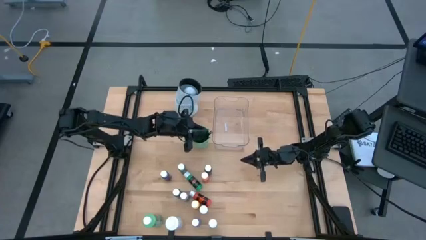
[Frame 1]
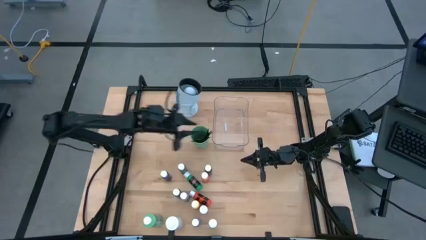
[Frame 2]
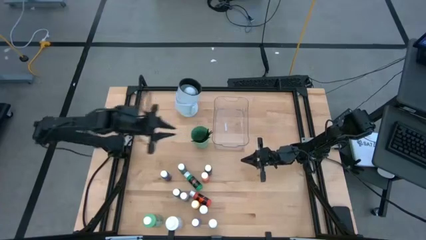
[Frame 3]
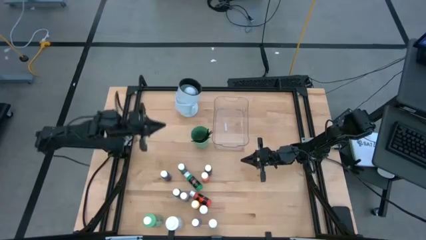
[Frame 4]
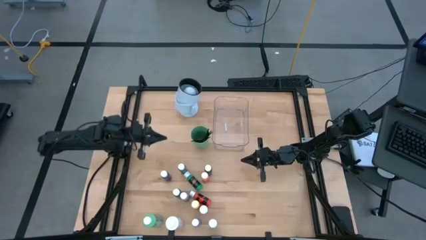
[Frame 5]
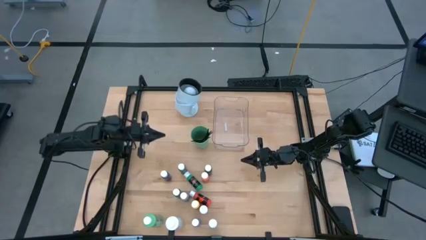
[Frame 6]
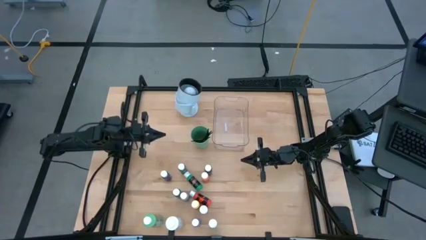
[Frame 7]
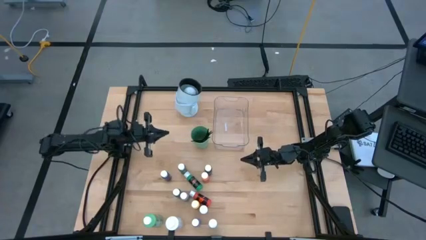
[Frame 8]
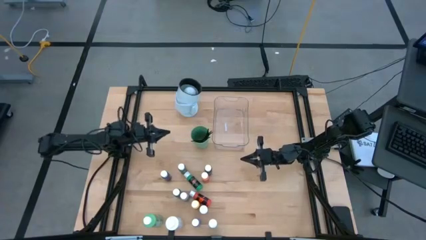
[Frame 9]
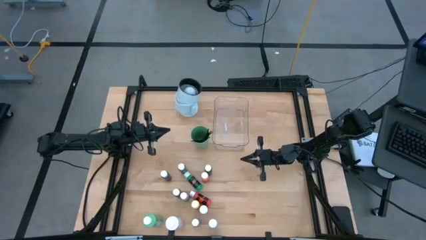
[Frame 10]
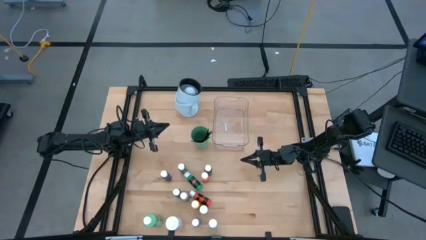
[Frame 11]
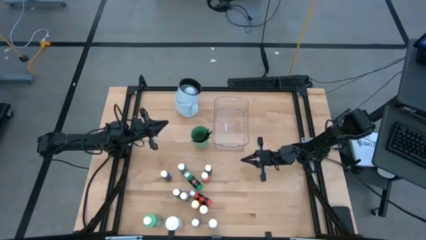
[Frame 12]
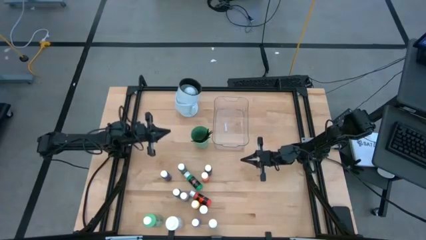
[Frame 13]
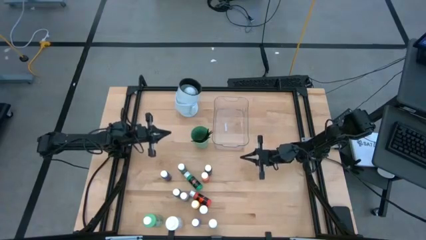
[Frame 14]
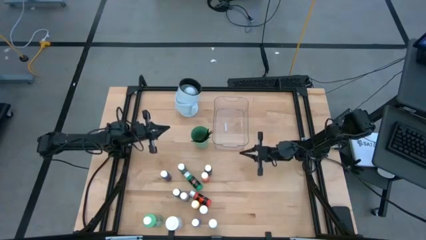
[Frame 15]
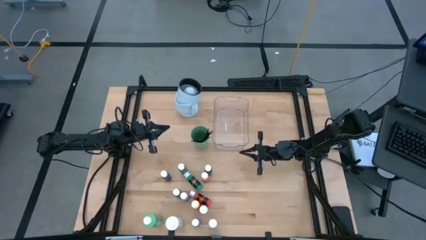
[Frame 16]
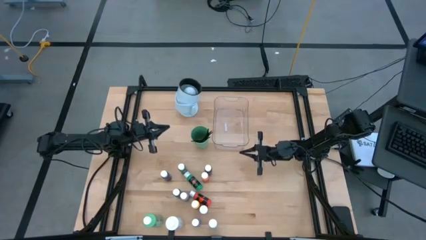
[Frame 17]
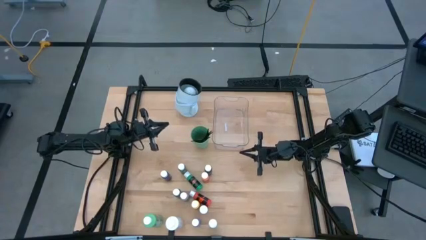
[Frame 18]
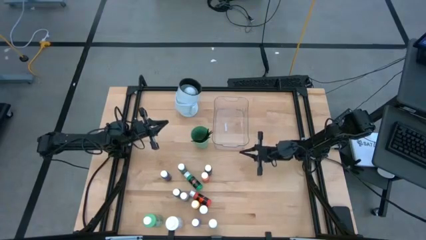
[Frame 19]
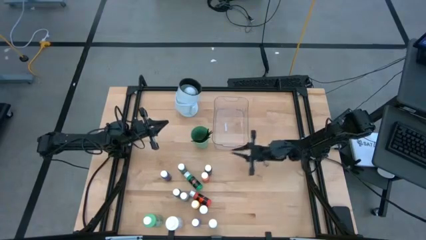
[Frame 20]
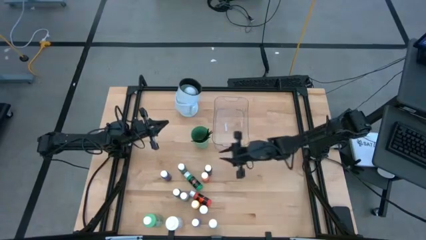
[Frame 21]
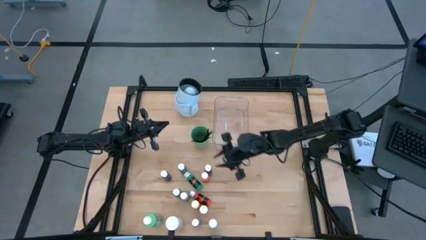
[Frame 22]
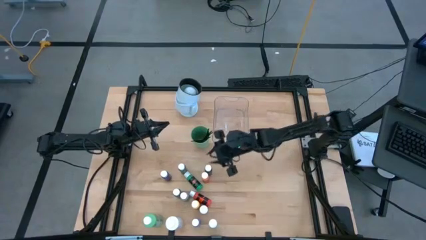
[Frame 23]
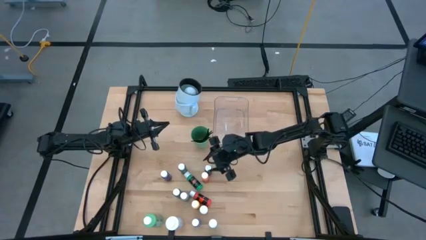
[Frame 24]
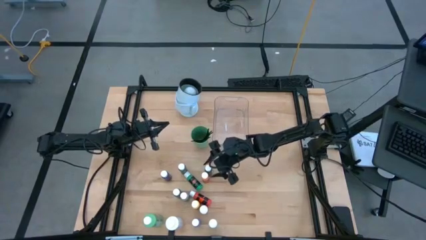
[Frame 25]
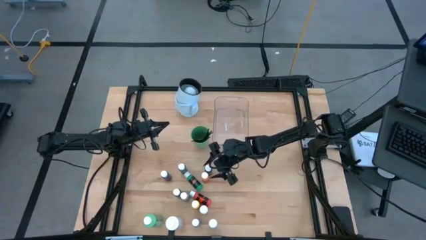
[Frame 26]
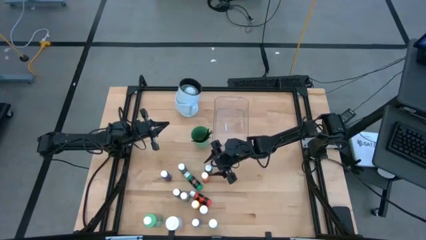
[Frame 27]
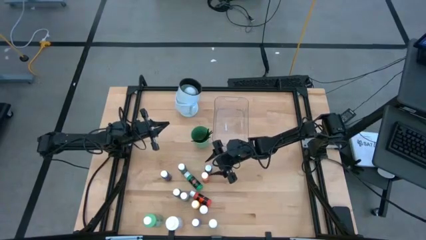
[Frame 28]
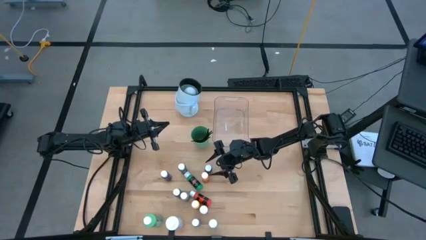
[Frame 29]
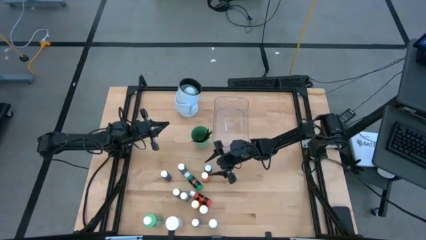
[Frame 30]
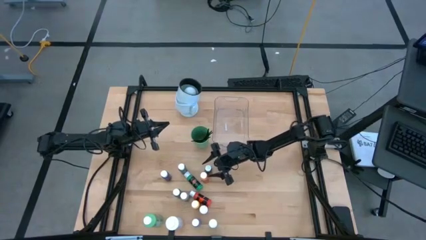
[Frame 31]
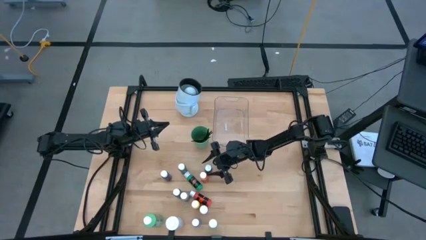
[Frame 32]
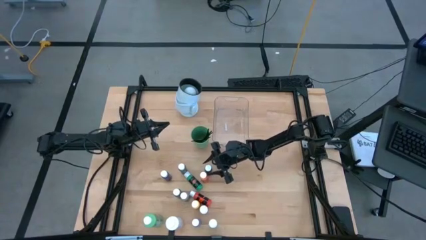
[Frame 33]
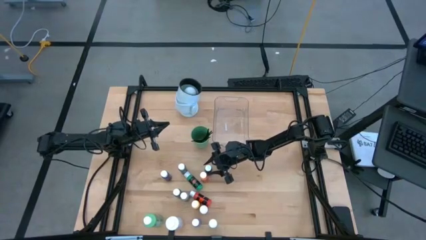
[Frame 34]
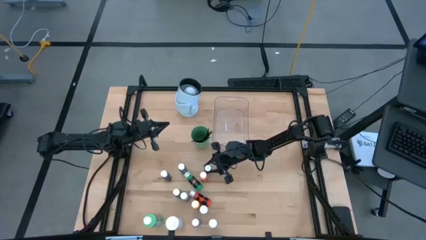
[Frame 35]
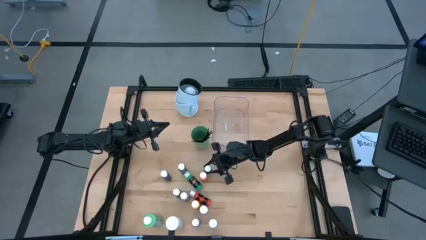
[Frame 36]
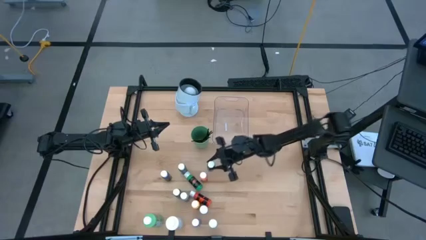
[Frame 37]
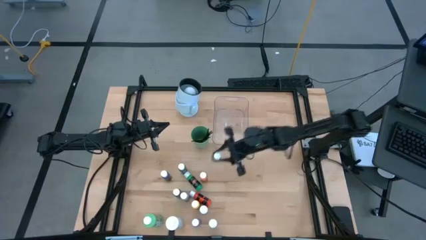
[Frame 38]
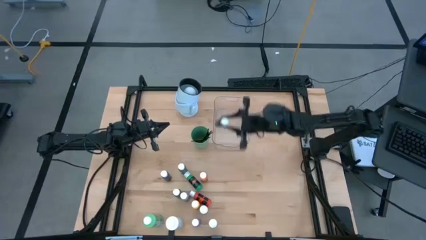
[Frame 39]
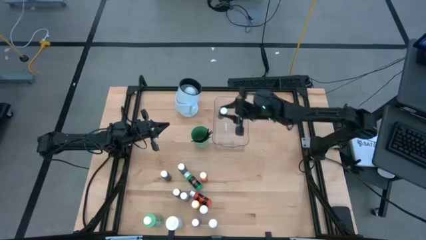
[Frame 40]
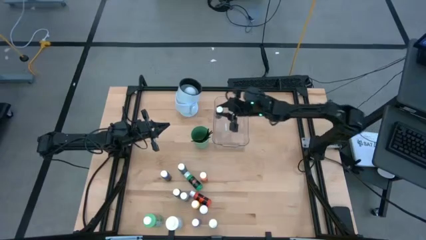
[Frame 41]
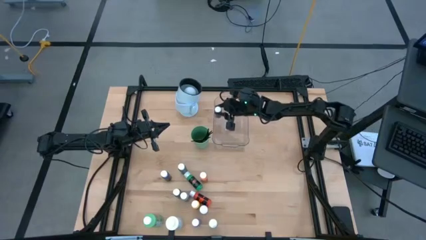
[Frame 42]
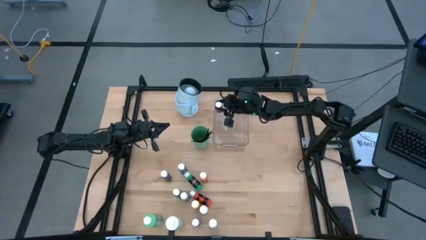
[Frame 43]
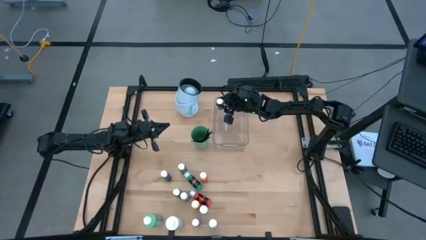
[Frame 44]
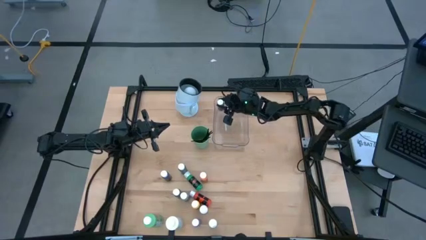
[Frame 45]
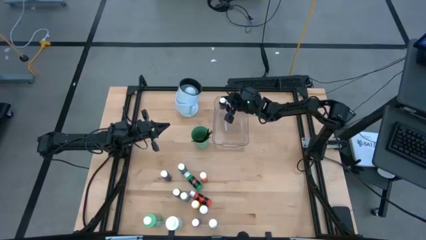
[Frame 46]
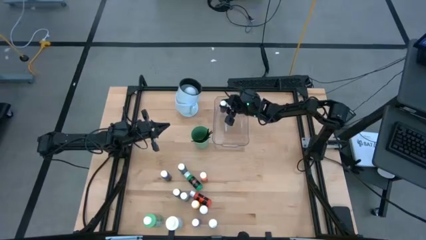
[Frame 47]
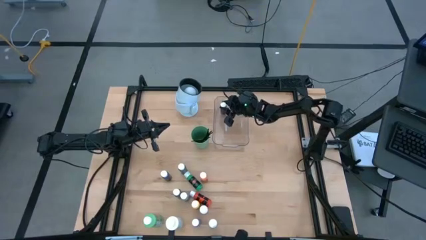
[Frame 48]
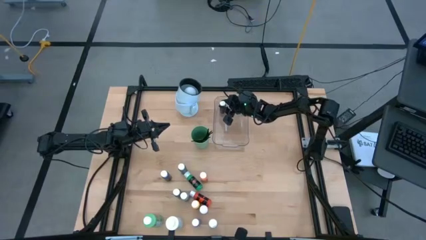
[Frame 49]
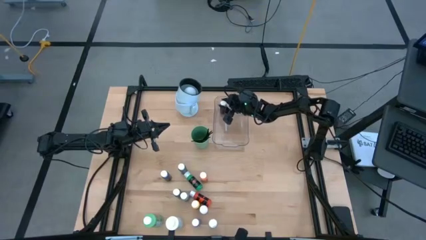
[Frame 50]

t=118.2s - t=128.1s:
Task: Pick & Place Paint Supplies
Put the small black paint bottle into the transparent bin

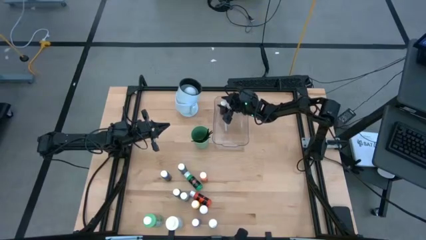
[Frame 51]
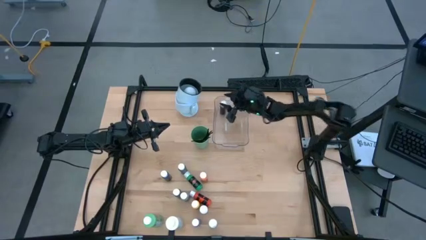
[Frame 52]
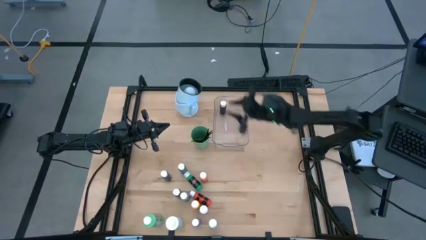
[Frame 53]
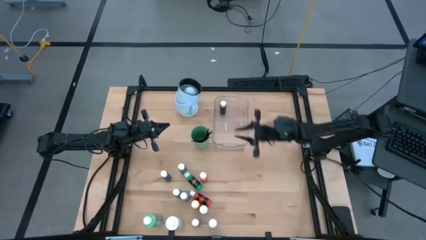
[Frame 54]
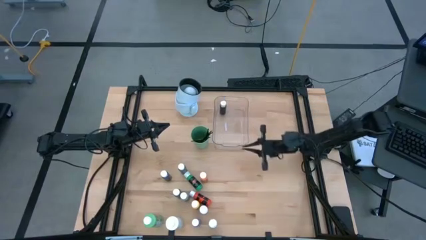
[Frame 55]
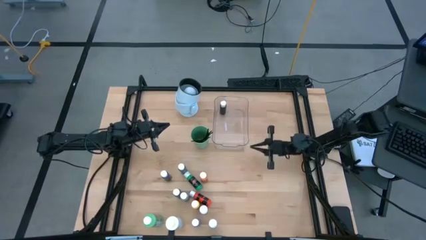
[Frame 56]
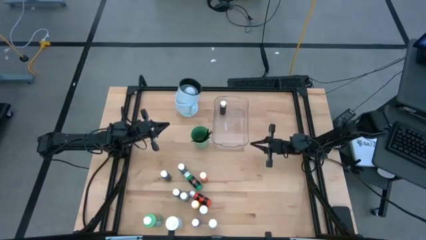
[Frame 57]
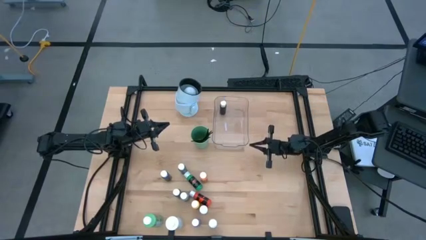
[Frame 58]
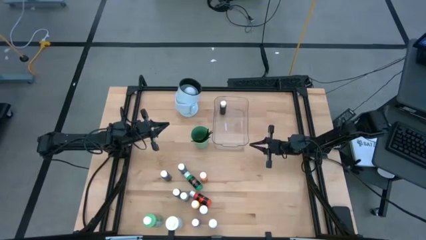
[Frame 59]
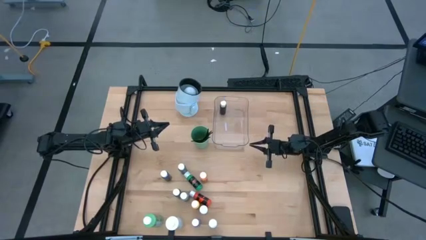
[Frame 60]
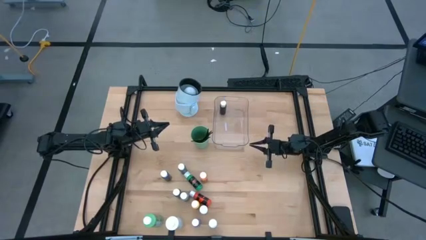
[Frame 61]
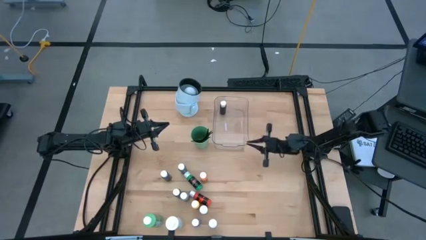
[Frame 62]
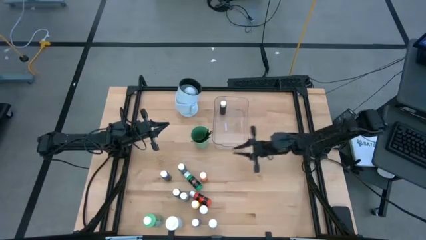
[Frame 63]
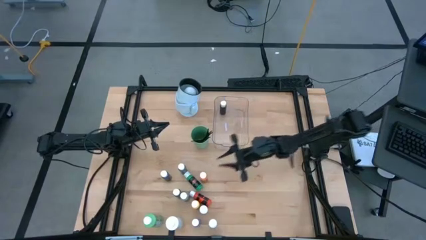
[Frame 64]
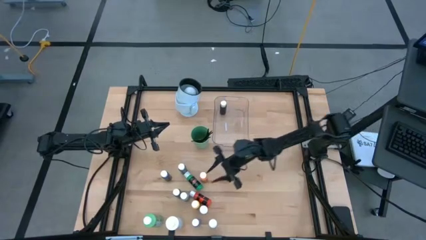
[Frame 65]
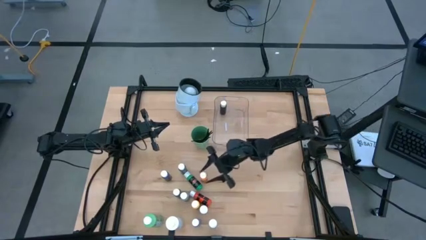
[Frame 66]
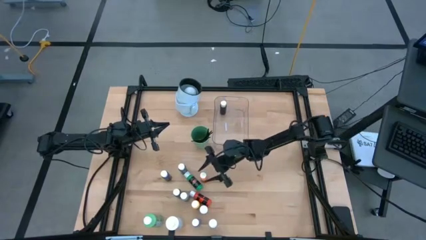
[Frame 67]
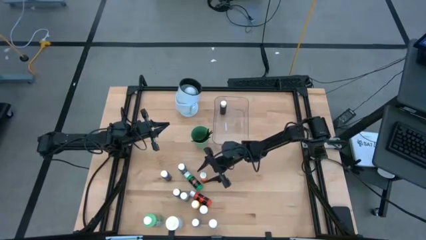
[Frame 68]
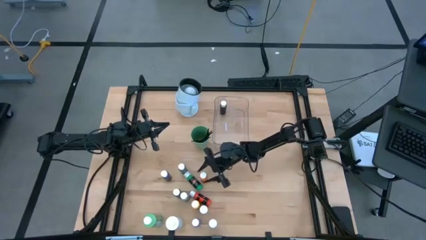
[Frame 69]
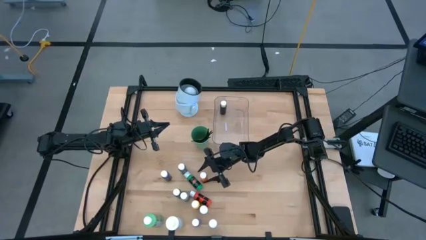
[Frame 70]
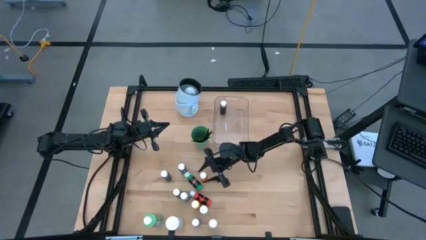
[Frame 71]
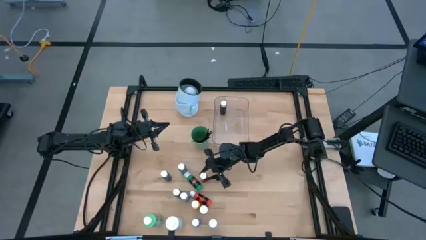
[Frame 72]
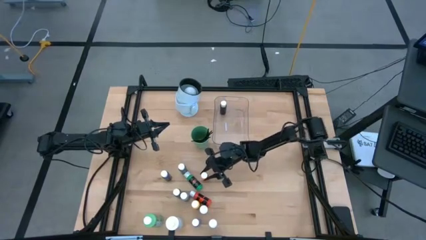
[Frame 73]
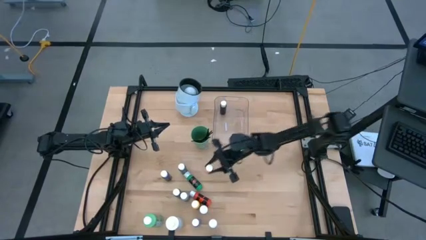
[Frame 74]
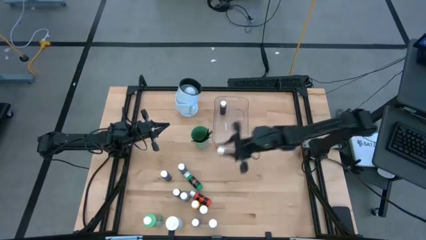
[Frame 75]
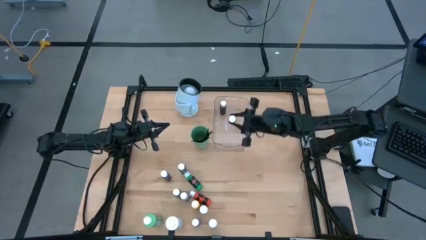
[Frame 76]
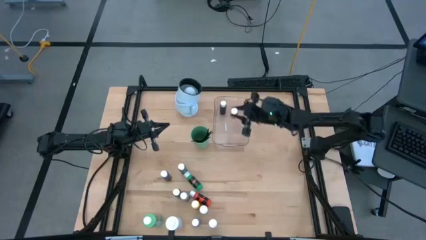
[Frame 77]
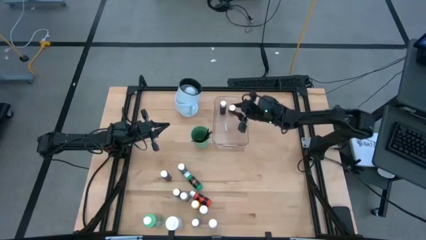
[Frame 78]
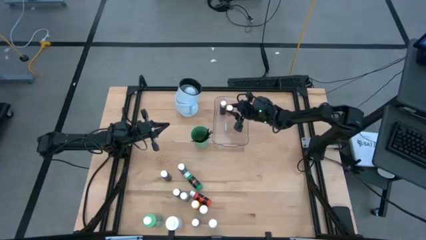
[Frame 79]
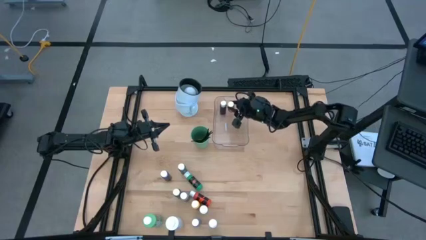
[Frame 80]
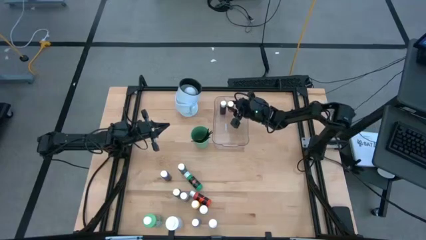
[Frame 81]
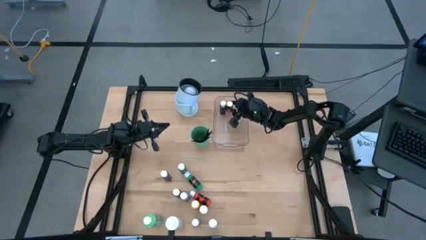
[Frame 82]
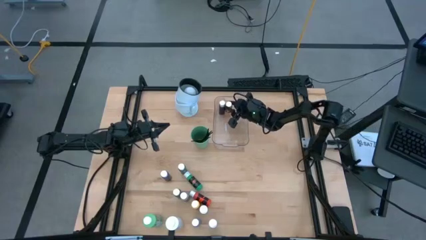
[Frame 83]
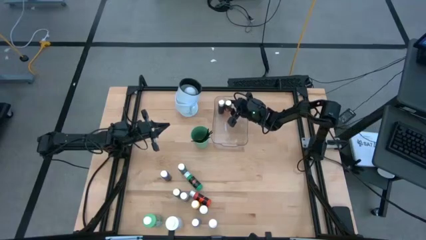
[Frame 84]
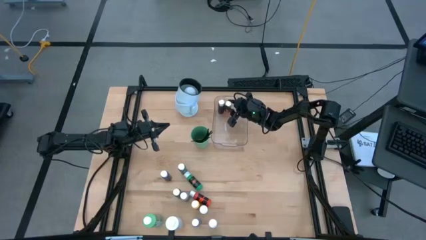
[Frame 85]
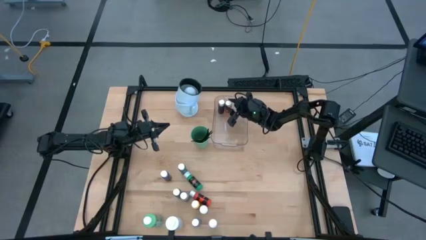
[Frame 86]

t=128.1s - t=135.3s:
Put the small orange paint bottle into the transparent bin
